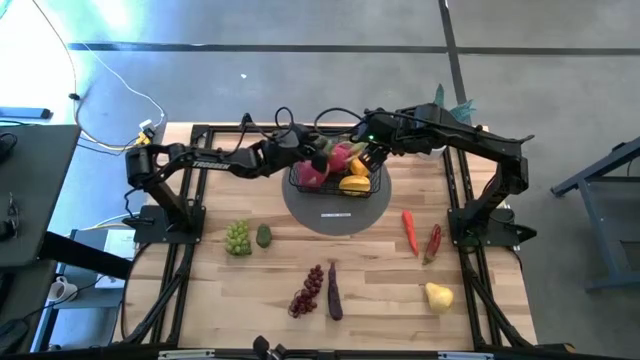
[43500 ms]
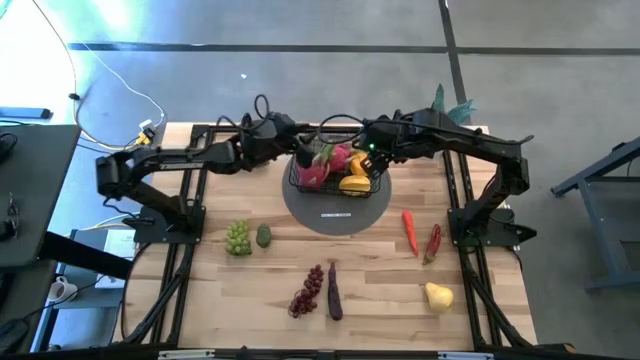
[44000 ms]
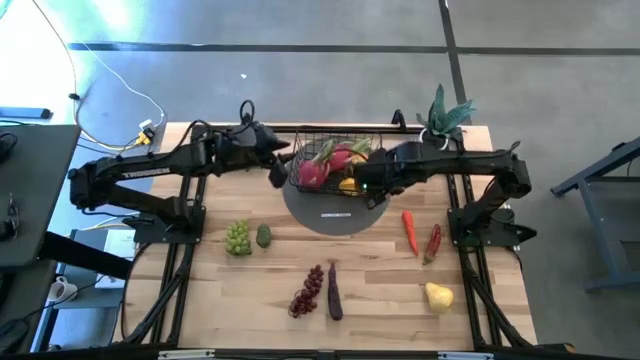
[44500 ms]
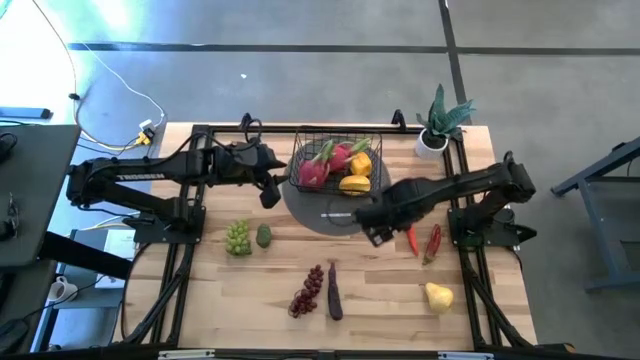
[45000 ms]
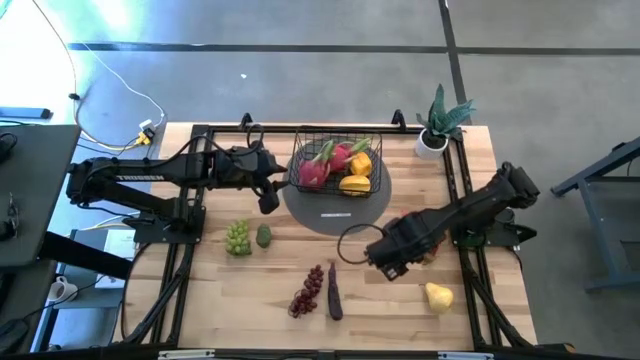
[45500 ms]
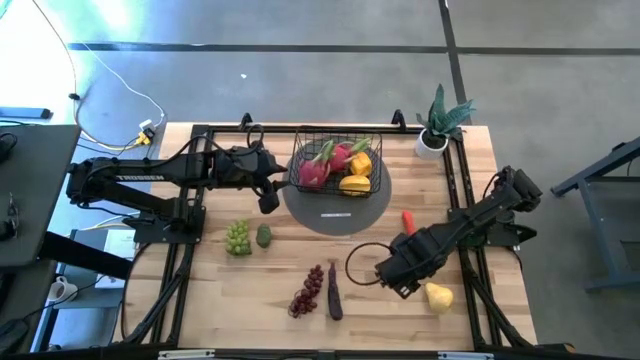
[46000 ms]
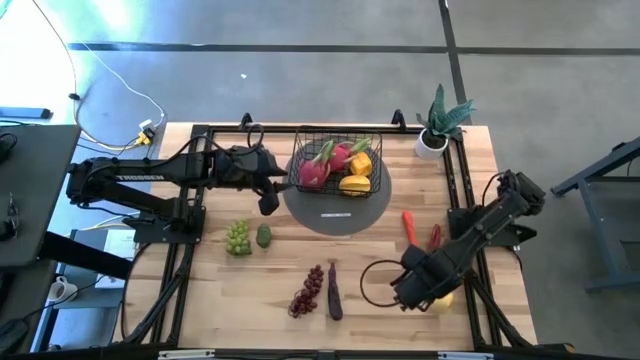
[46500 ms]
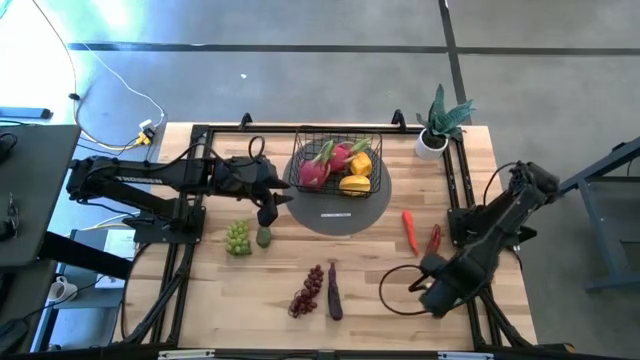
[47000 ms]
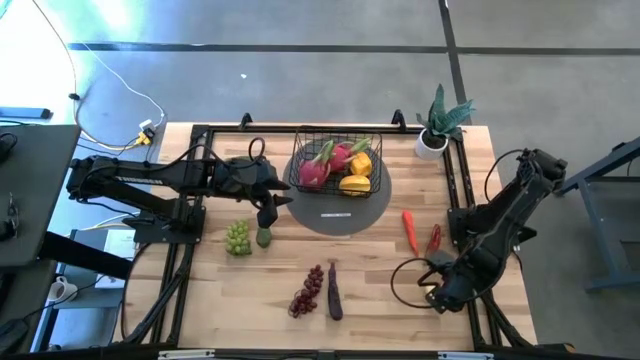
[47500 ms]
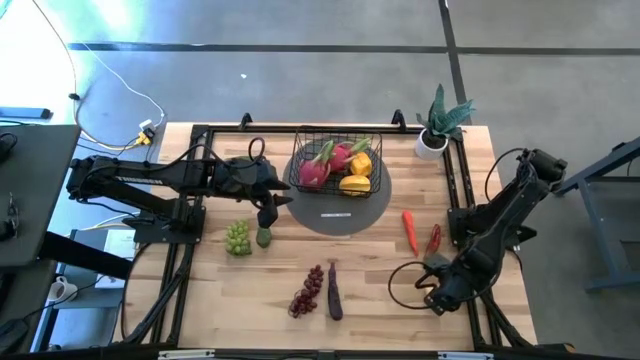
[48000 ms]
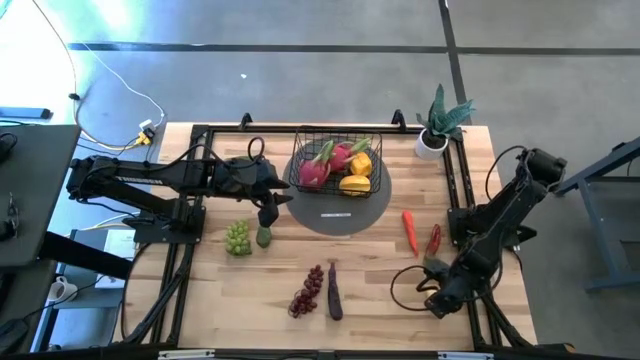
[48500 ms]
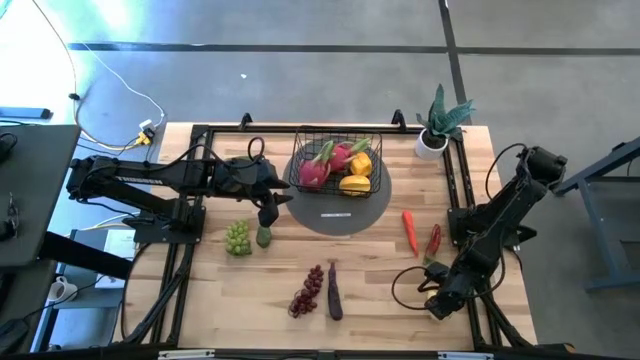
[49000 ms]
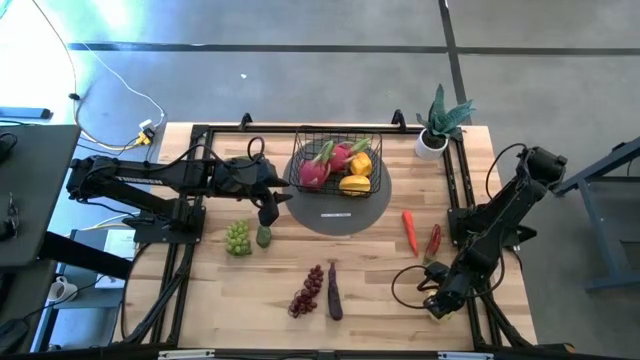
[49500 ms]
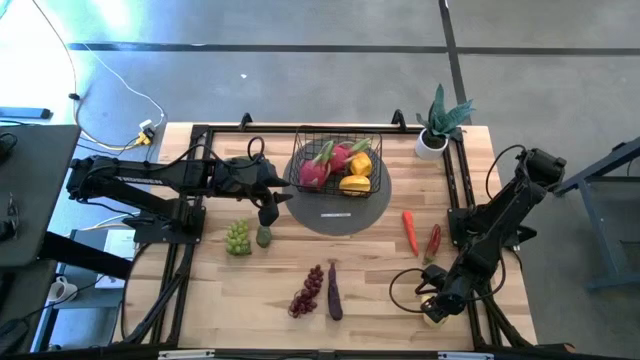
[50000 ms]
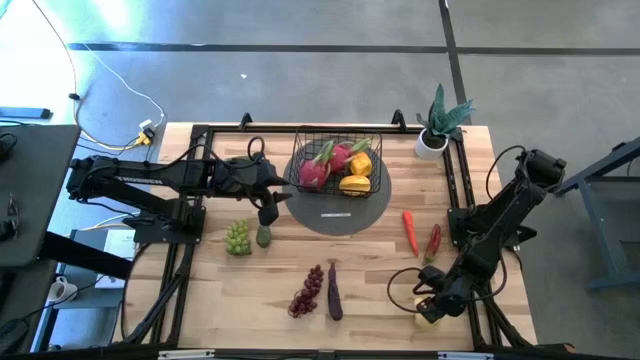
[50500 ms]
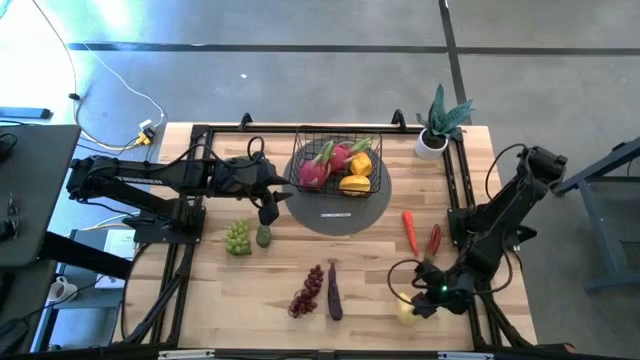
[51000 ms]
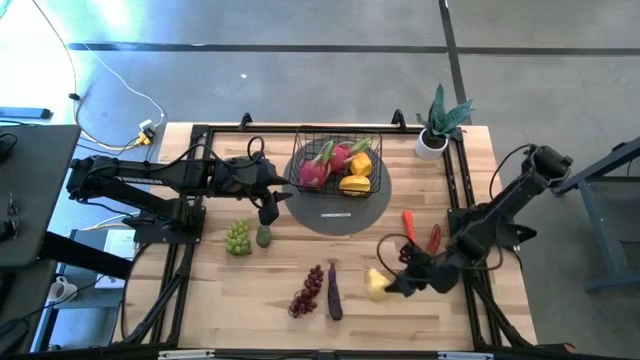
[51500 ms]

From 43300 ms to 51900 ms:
Task: Build produce basket
Put the pear into the wire basket

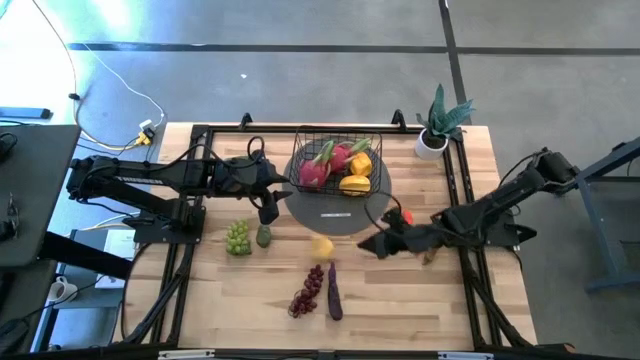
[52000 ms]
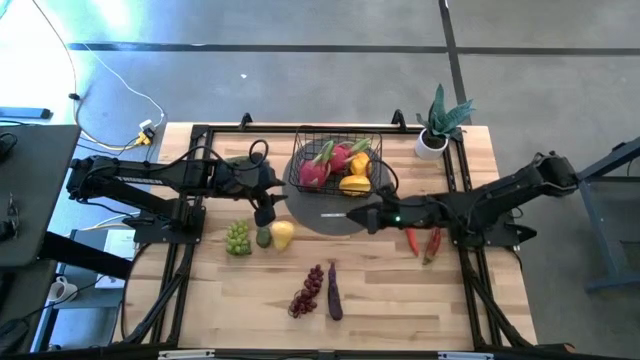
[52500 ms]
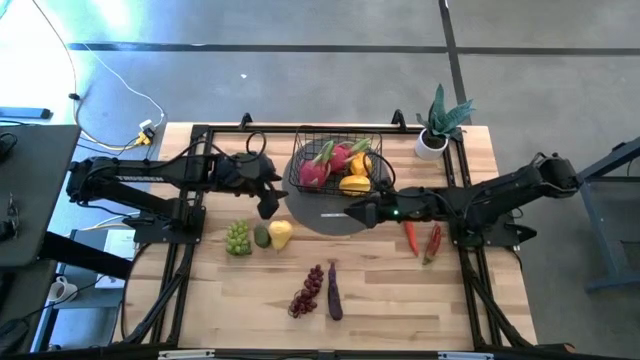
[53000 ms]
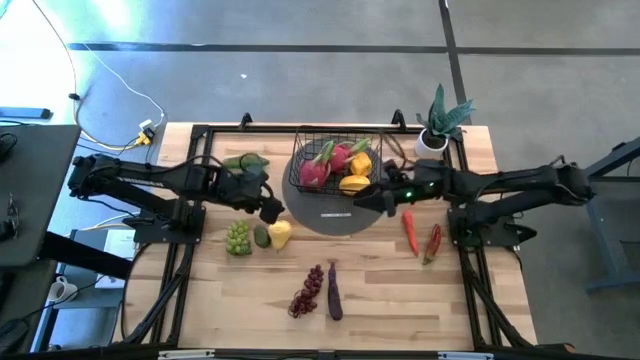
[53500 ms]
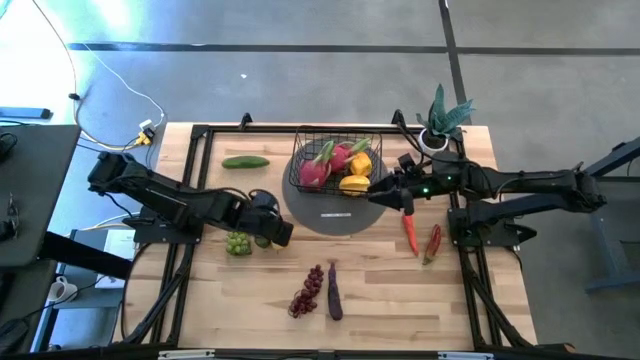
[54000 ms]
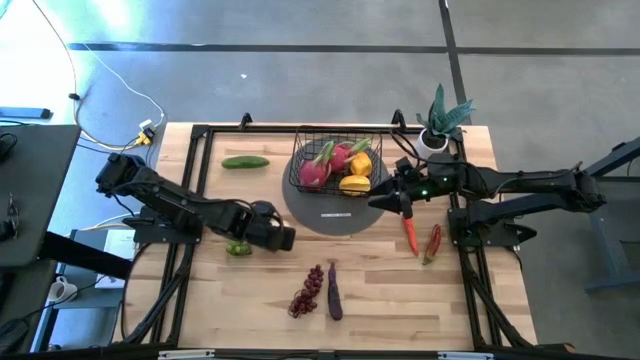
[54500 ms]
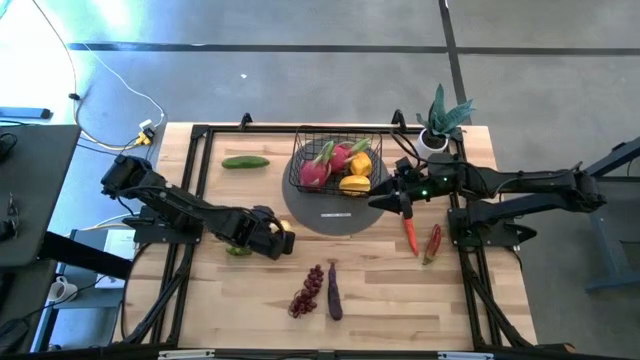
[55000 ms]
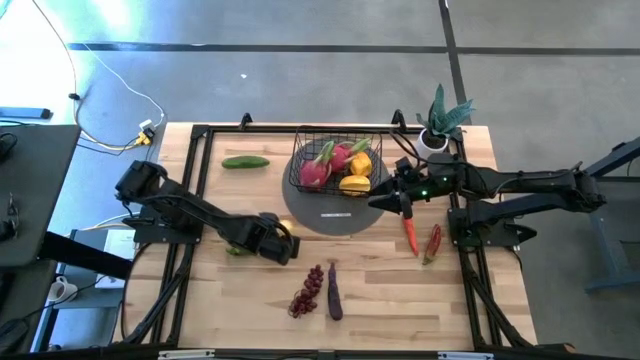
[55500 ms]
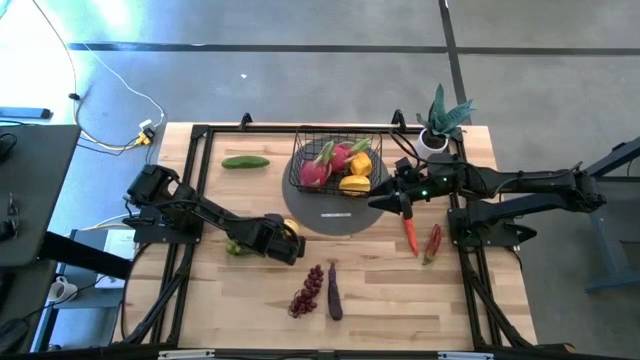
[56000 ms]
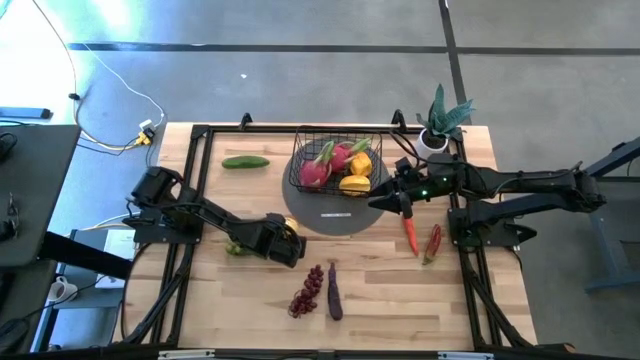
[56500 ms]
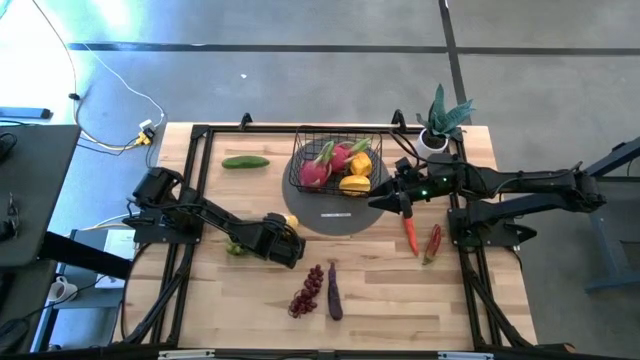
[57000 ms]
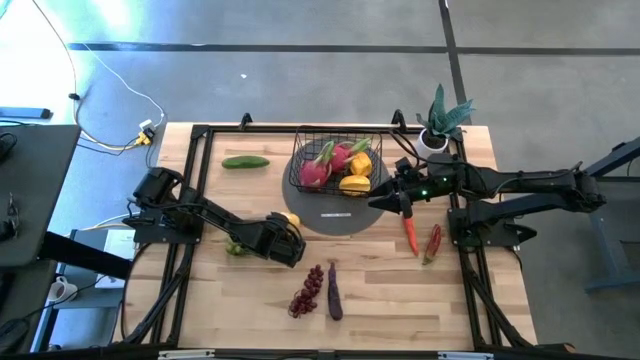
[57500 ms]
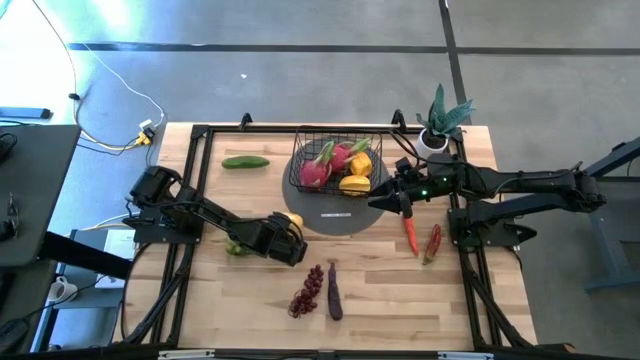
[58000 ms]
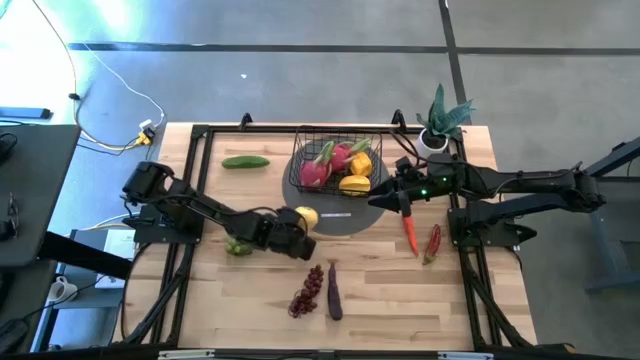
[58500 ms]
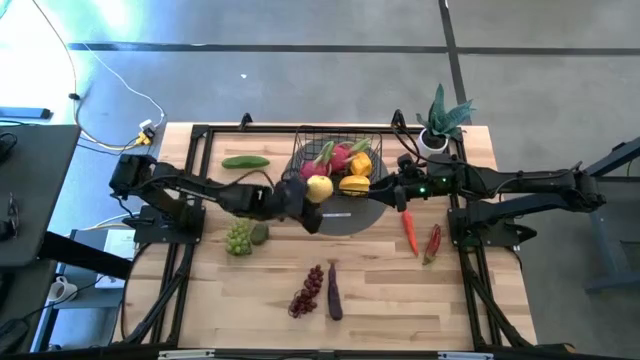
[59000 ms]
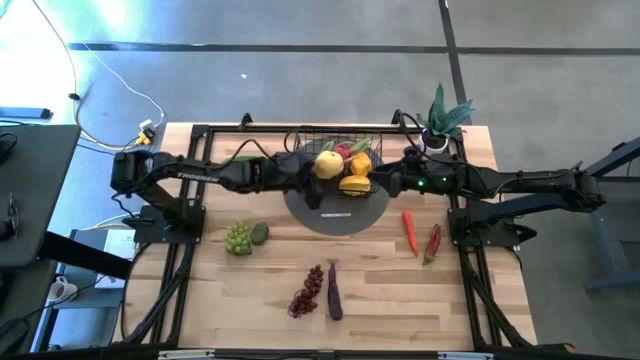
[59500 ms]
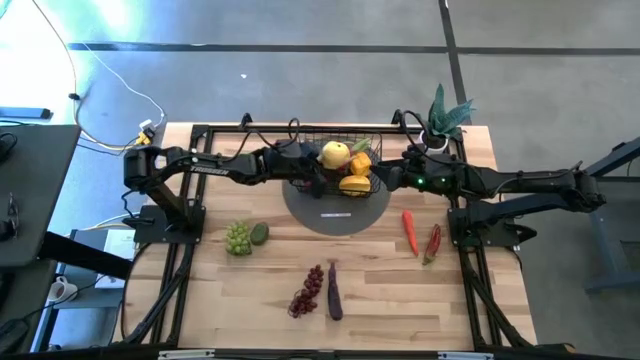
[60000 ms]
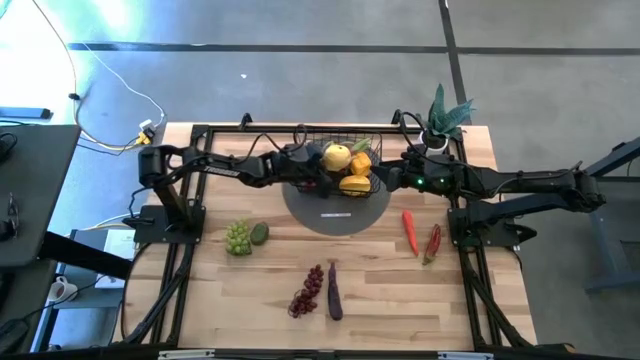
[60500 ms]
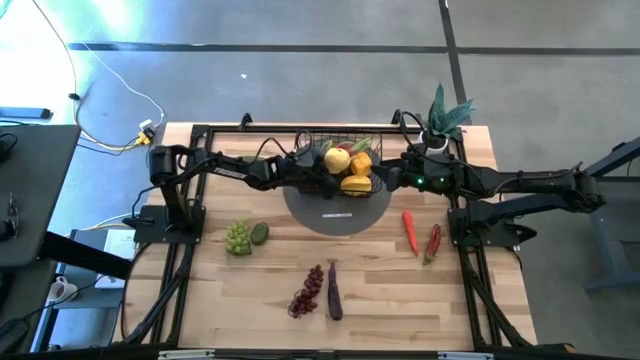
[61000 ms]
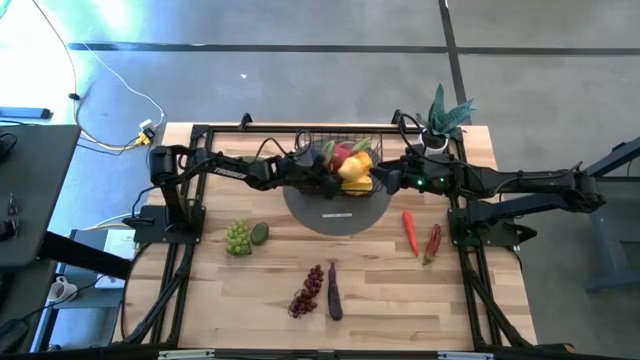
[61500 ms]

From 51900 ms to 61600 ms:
Put the pear into the wire basket

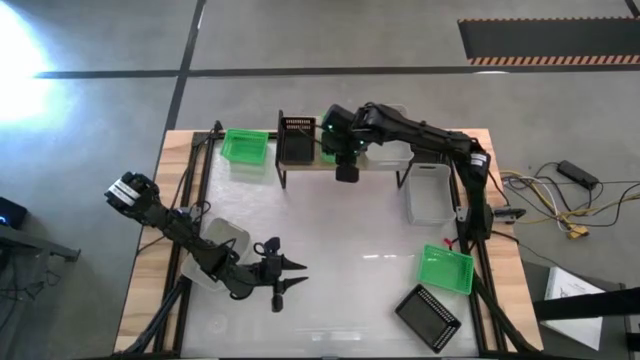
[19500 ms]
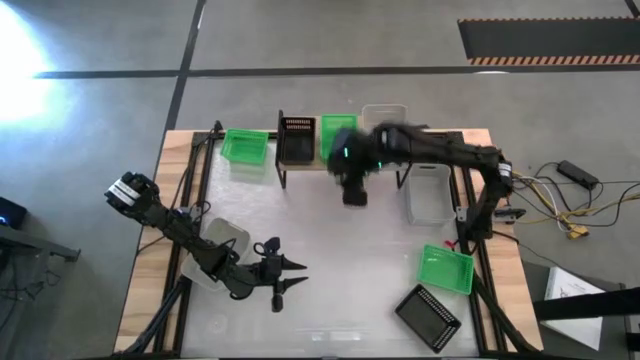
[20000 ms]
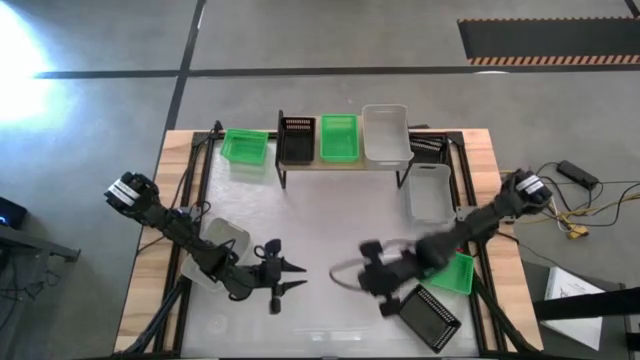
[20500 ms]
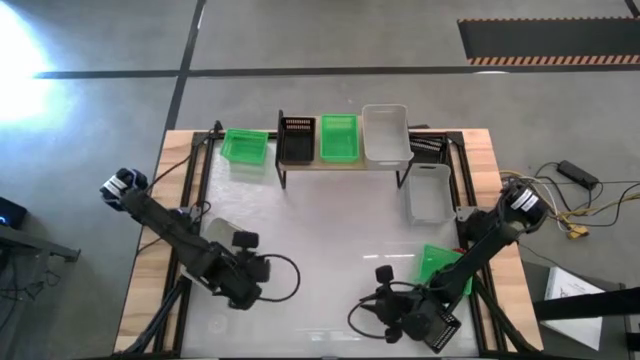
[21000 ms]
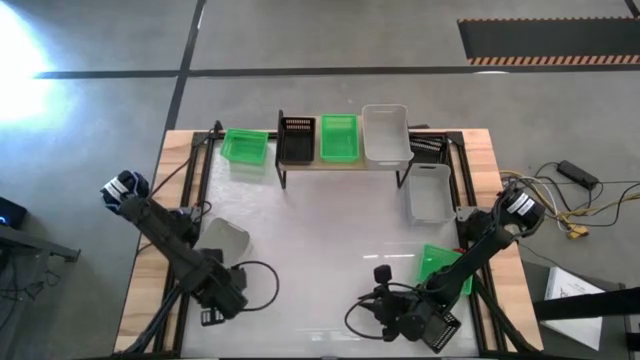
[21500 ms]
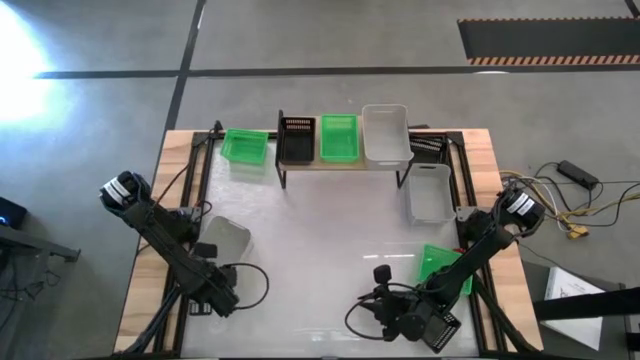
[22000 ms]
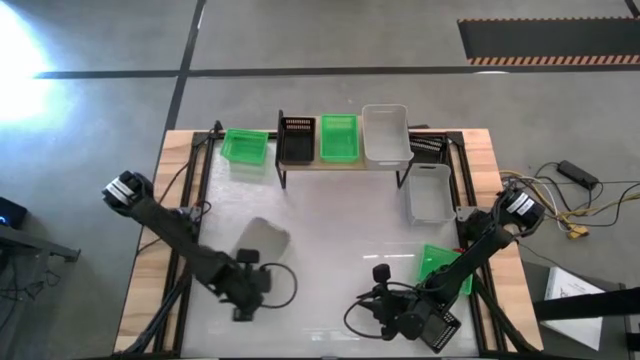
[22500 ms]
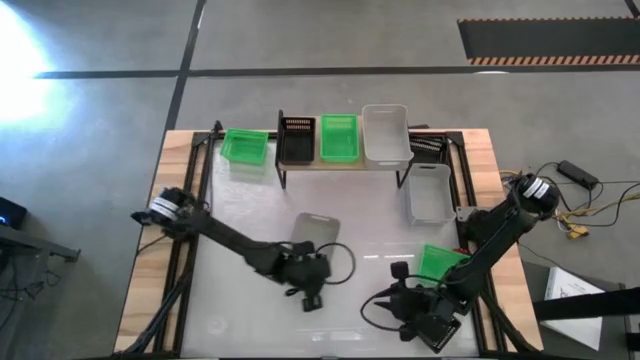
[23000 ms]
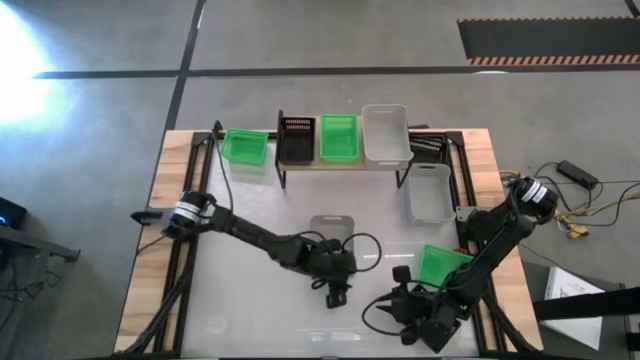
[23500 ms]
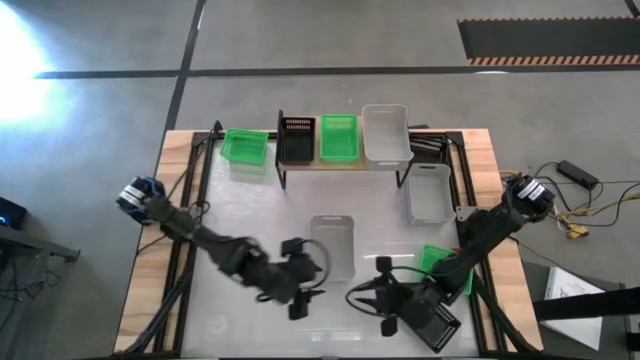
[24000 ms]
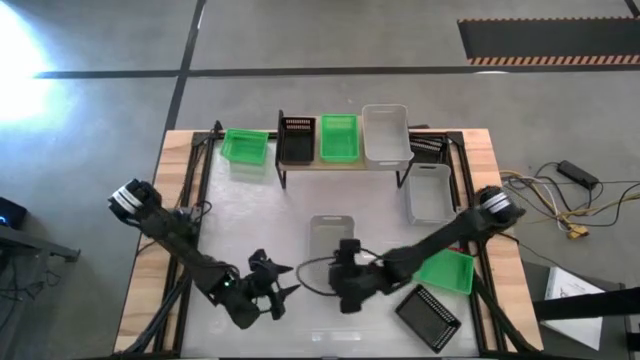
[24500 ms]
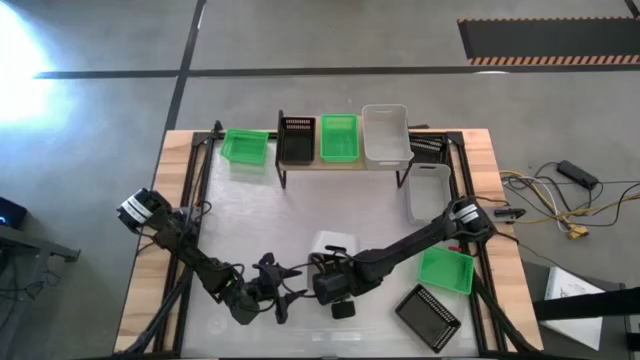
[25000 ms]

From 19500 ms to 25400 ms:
Task: Stack baskets on shelf by color
Stack the left white bin on top of the white bin on the shelf
